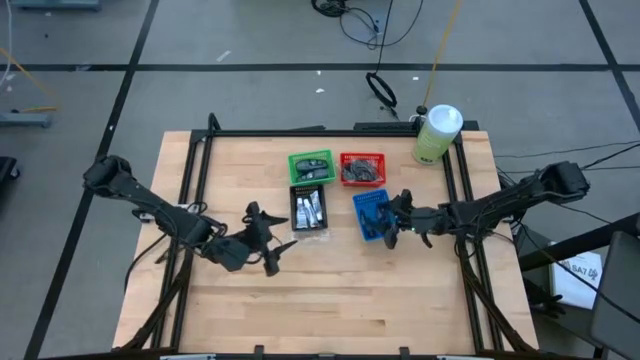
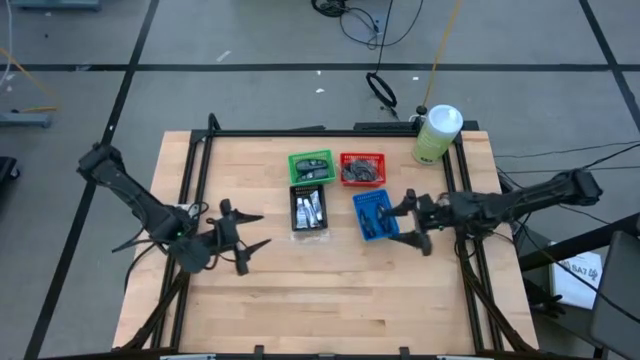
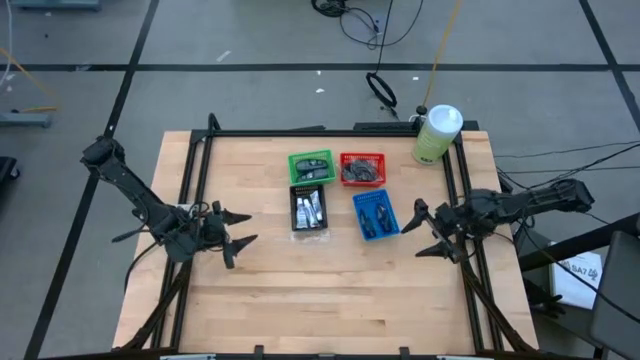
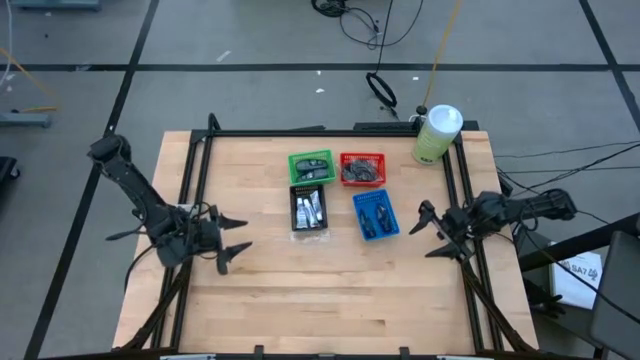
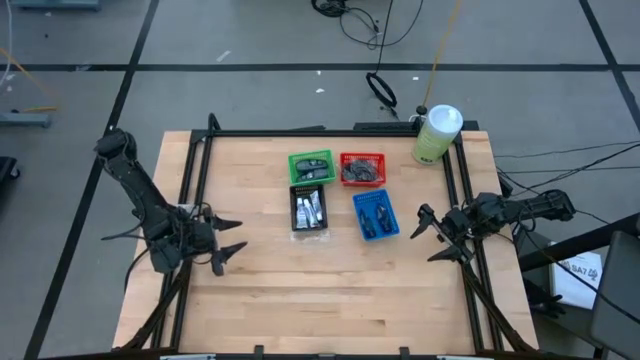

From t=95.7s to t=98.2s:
Task: Pick & Place Travel size toiletries
Return to Home Position

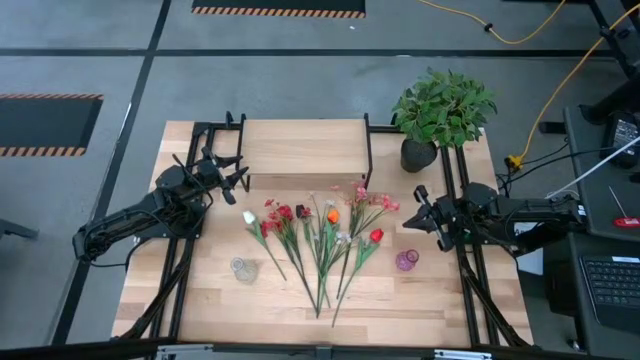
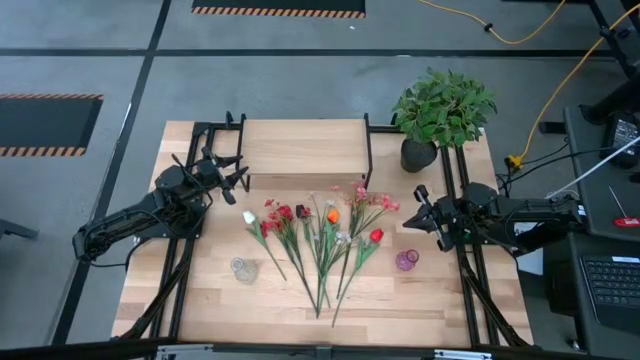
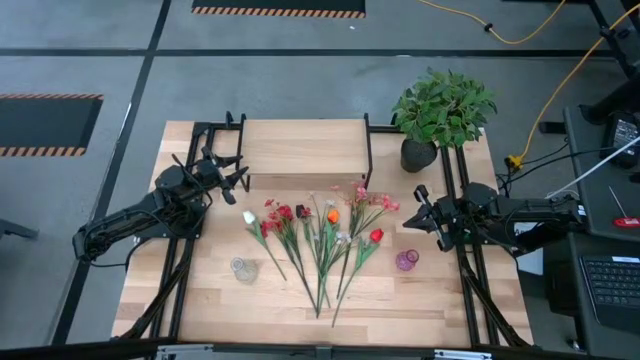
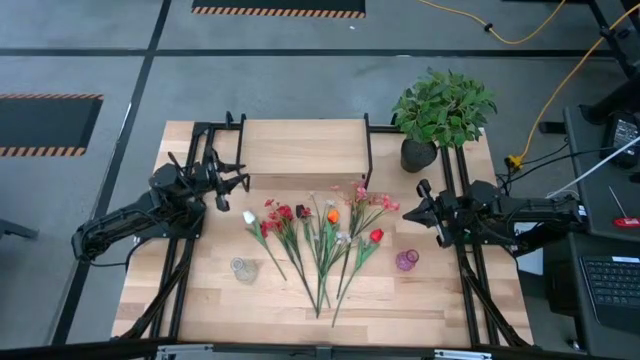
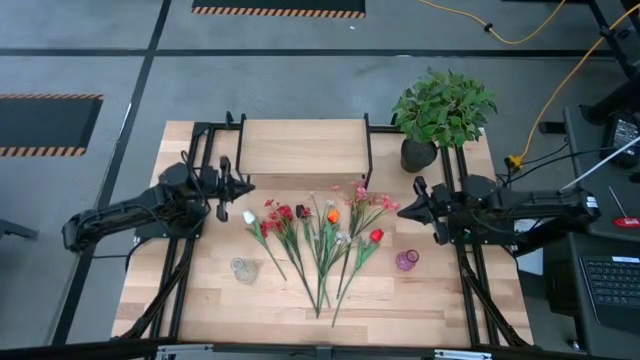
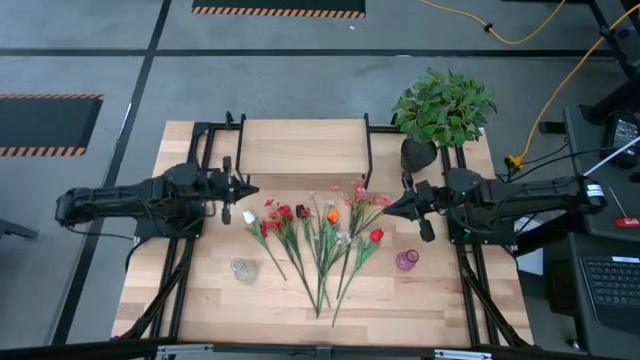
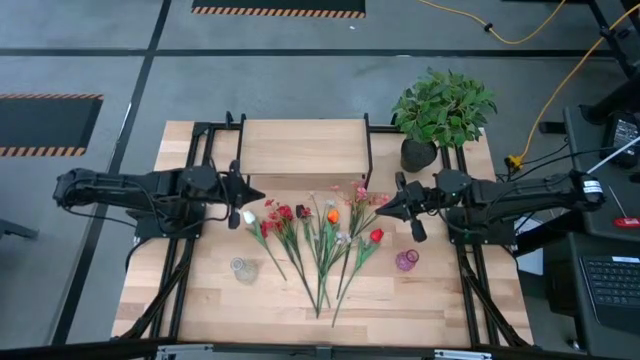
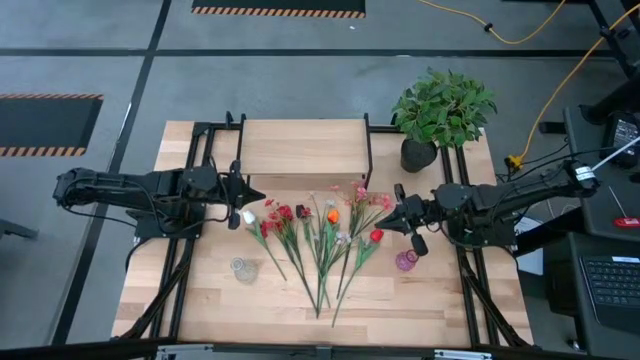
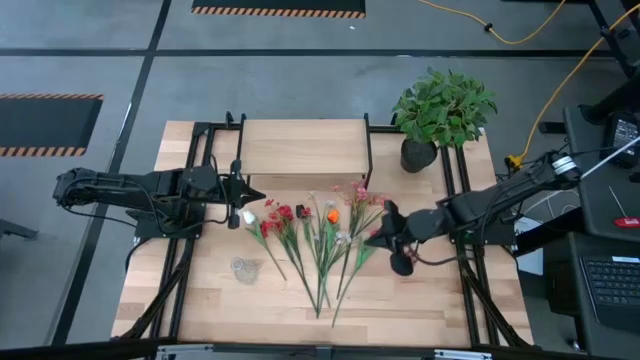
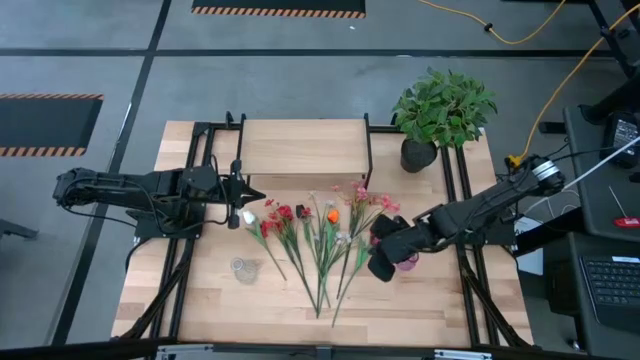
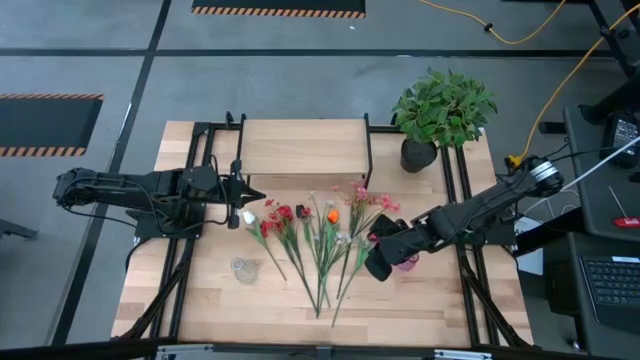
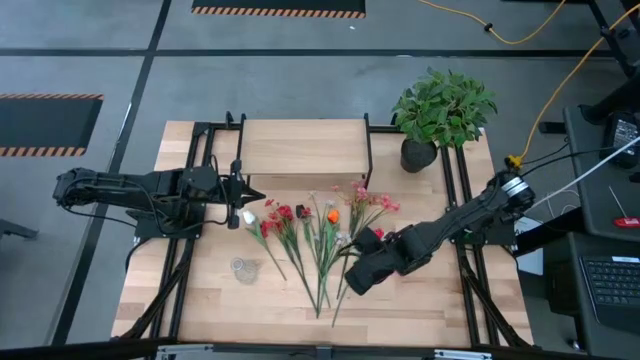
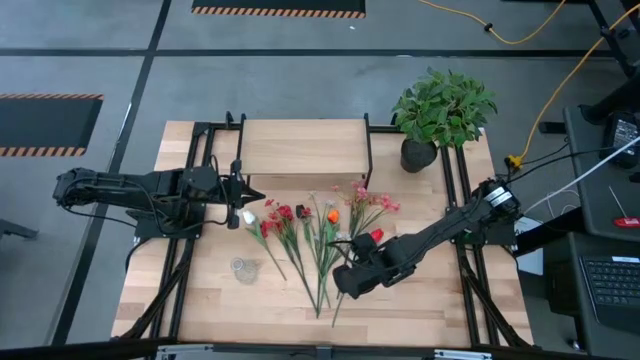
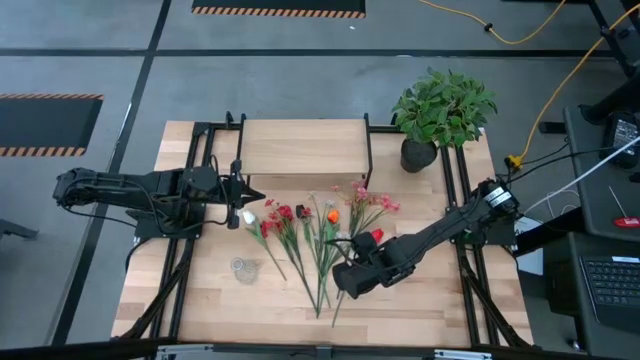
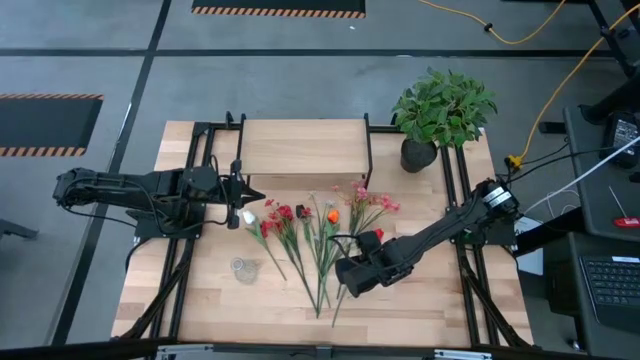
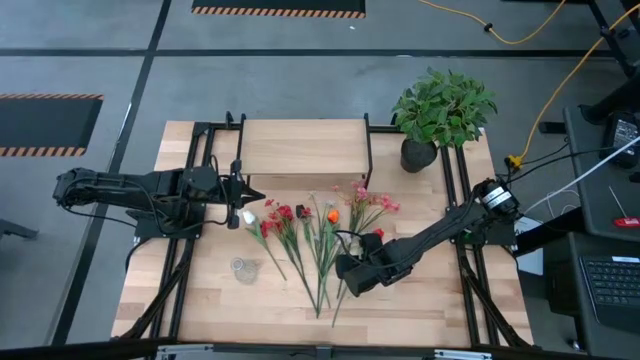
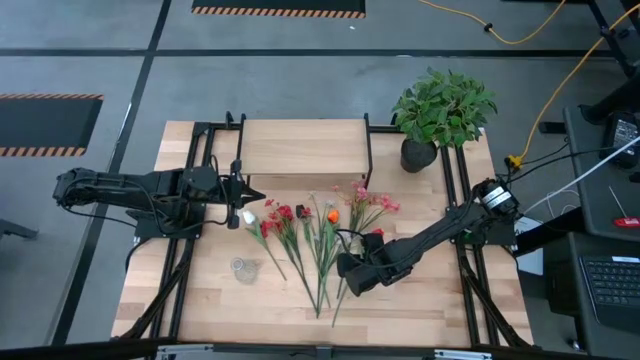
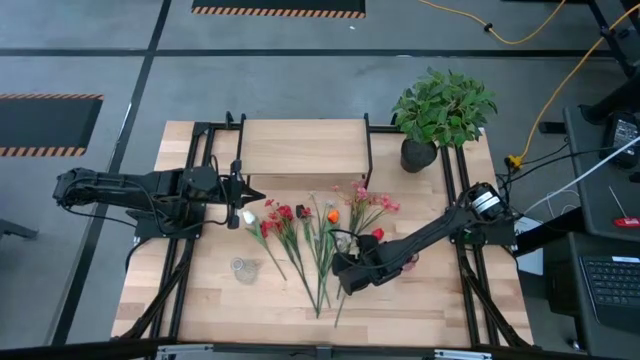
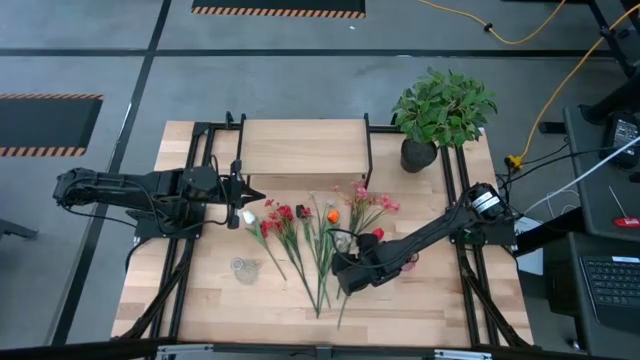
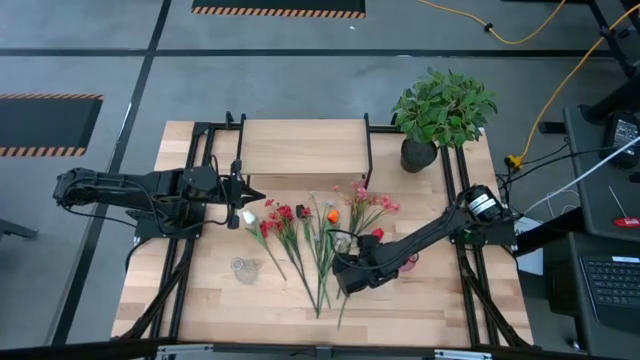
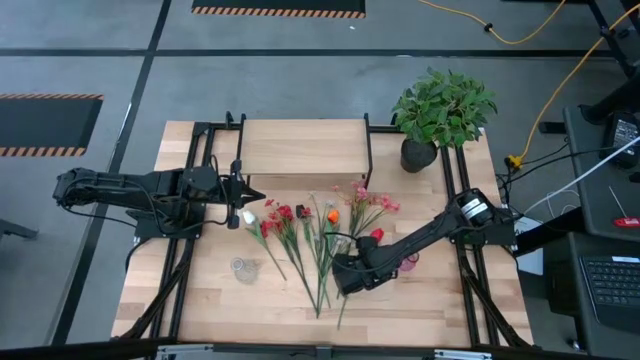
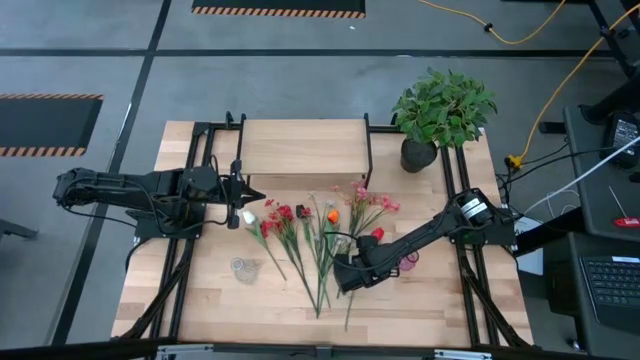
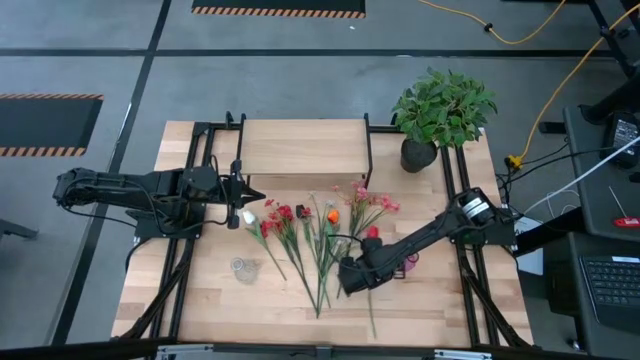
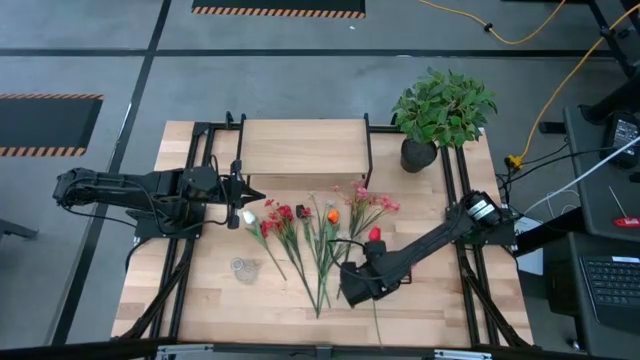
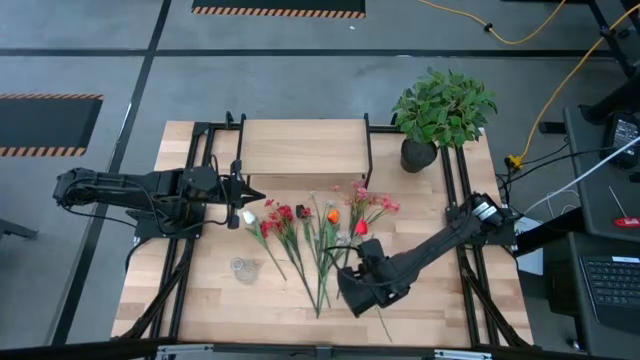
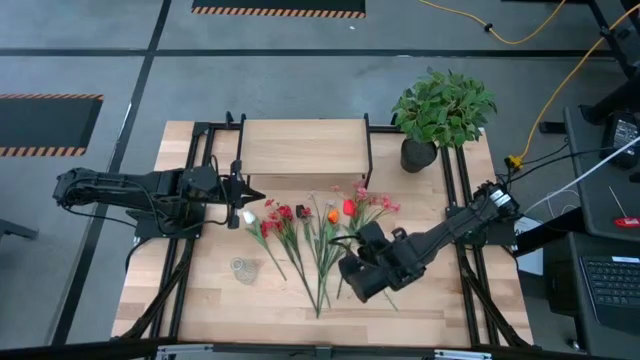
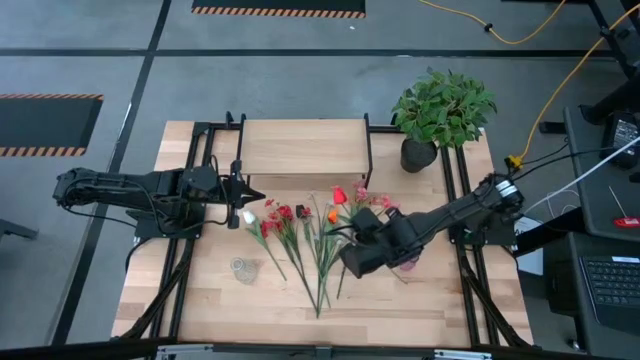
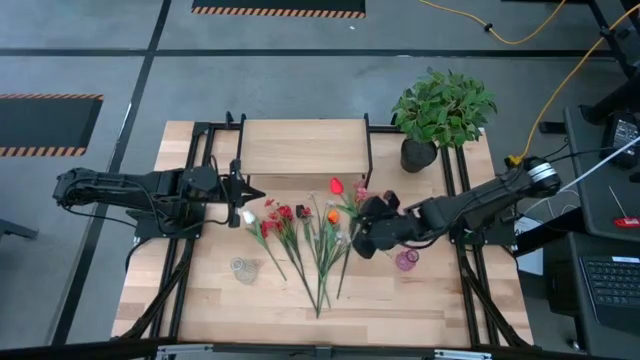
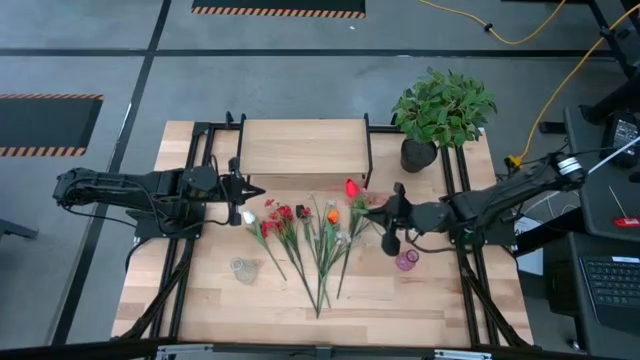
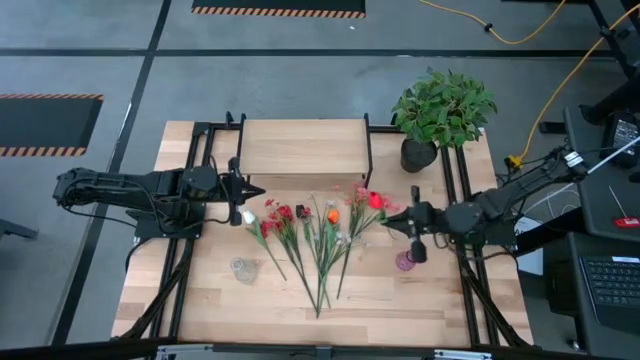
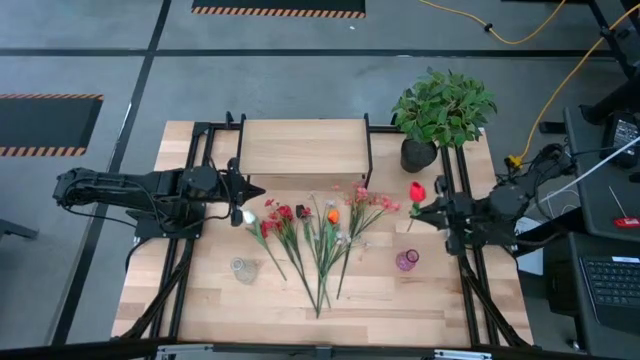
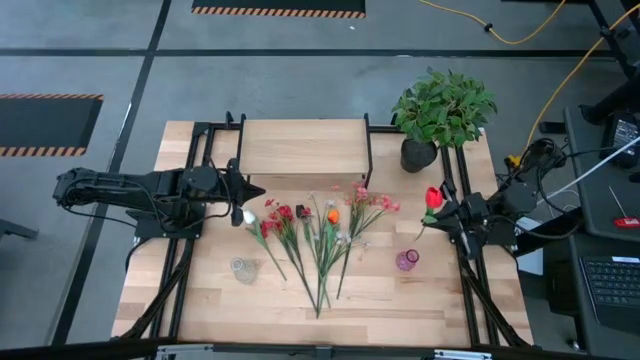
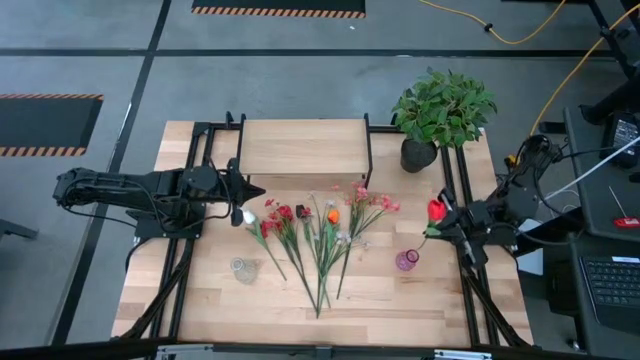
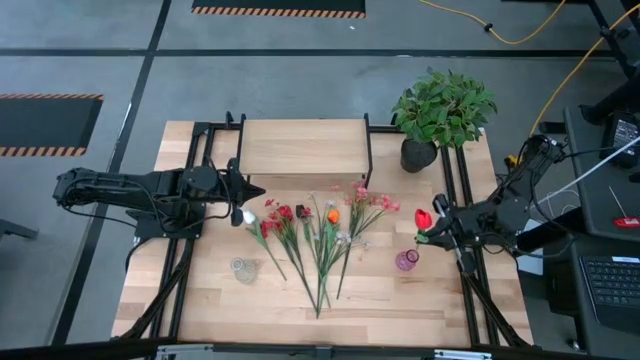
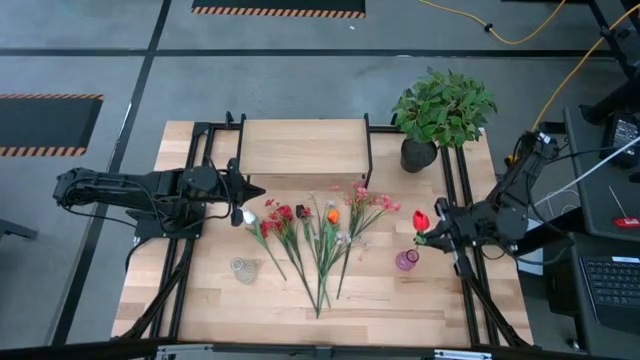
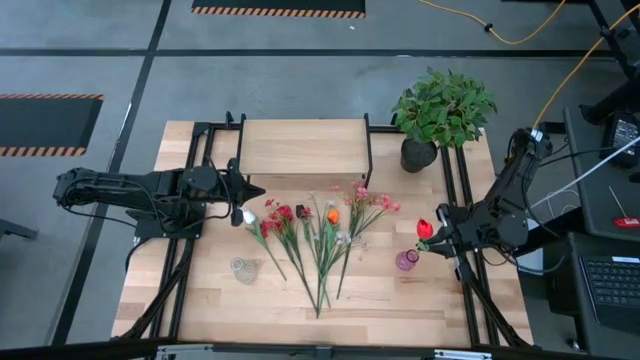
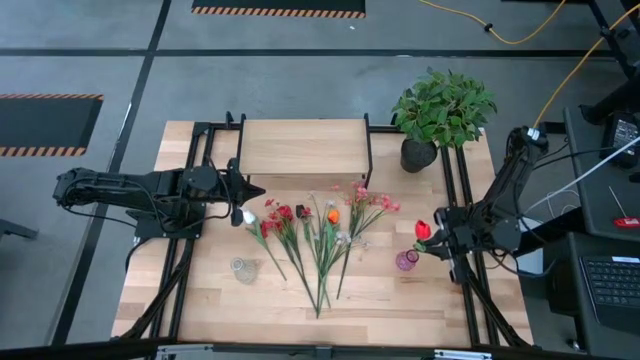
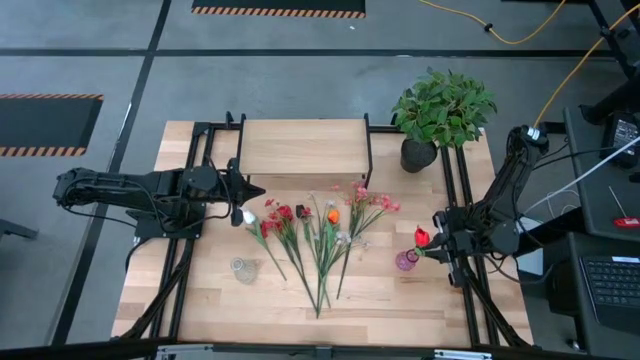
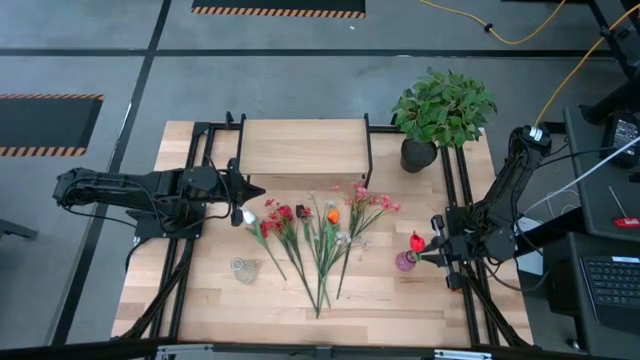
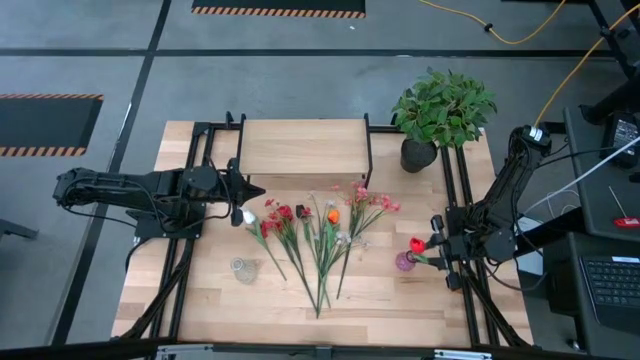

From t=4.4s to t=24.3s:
Task: Pick and place flowers into a vace then onto a shelf
Put the red flower into the pink vase
